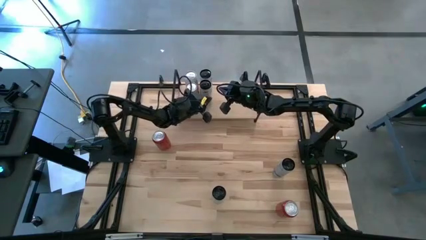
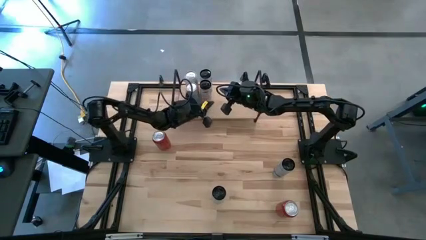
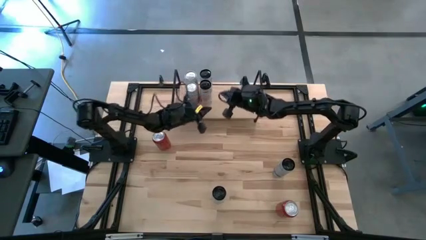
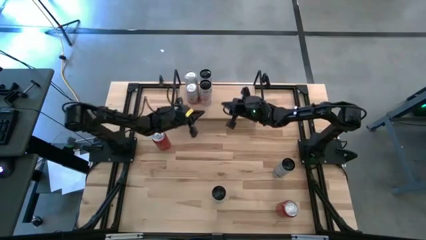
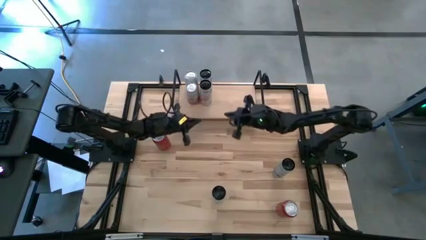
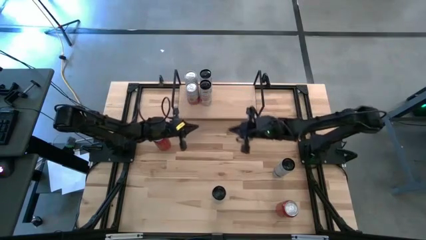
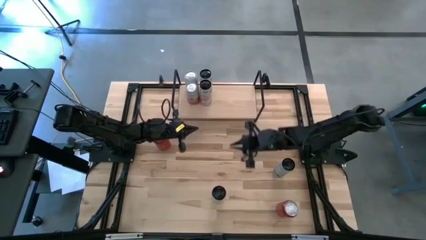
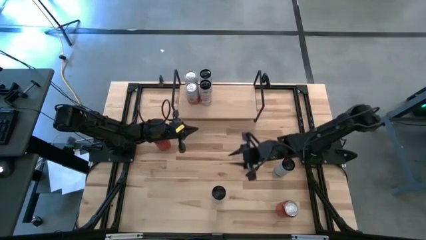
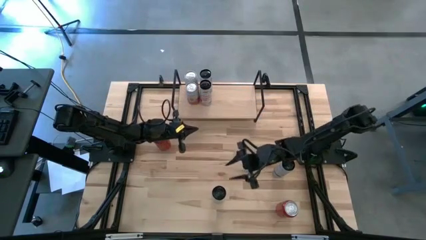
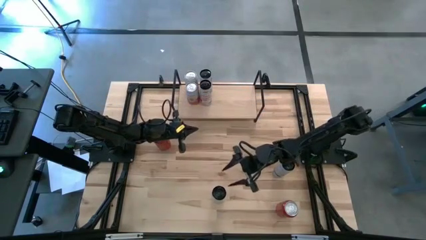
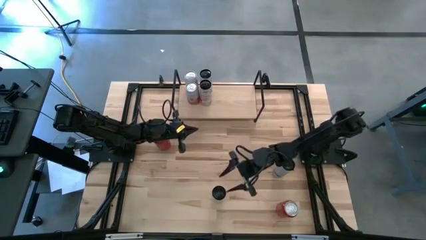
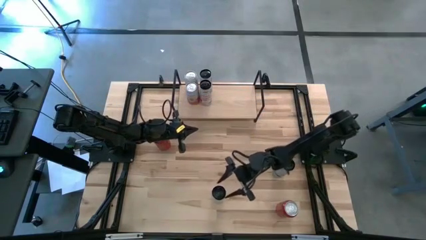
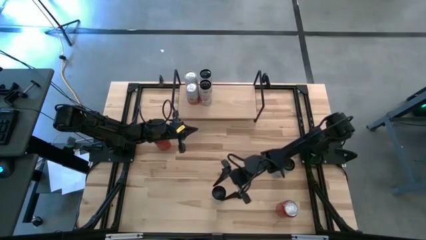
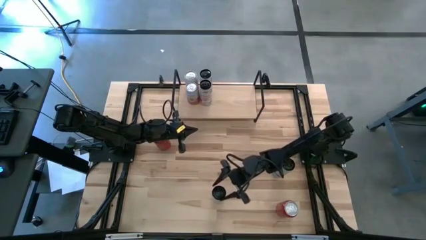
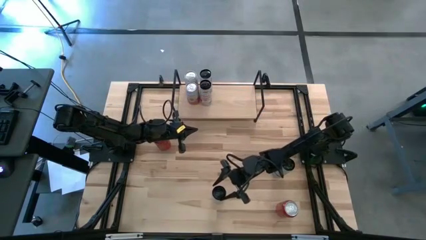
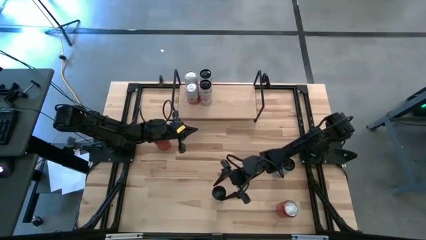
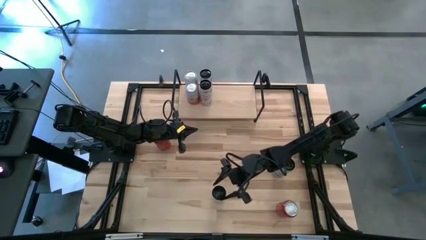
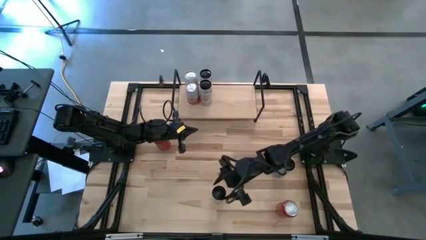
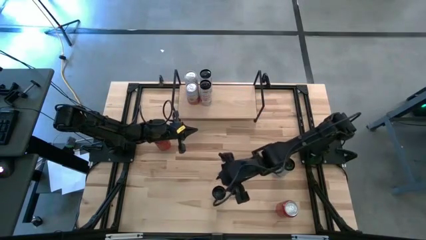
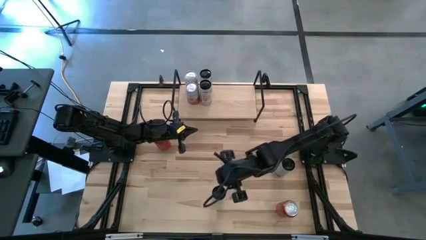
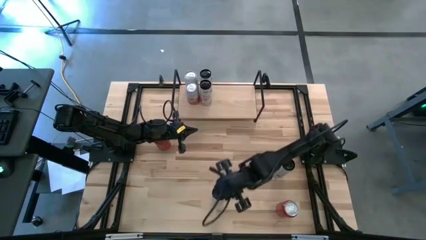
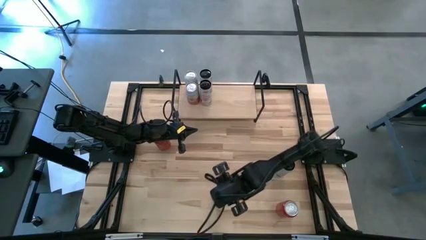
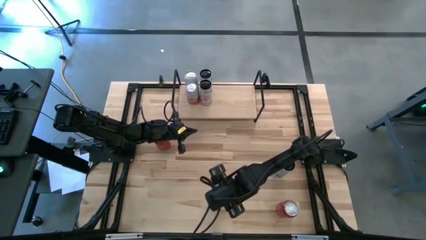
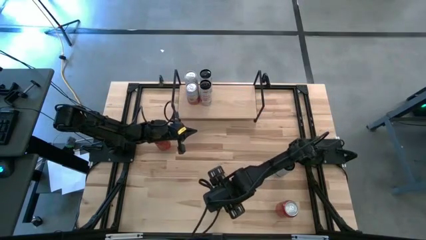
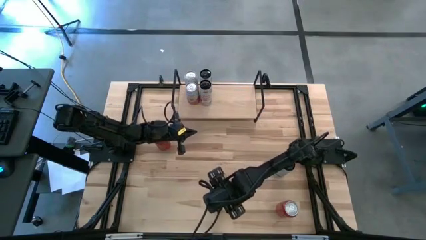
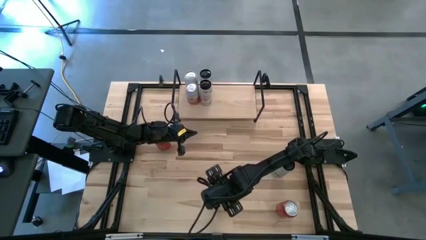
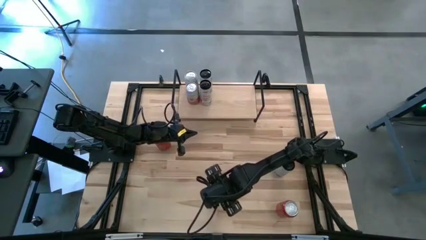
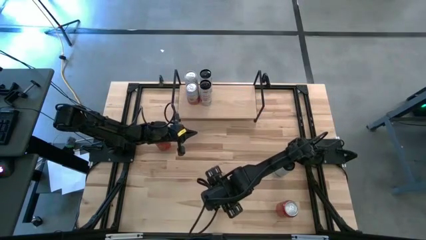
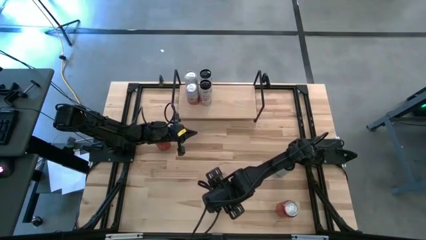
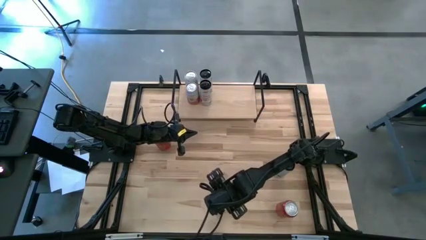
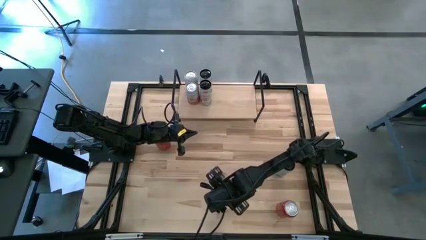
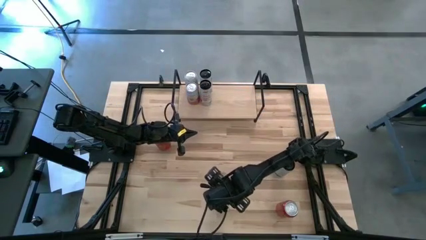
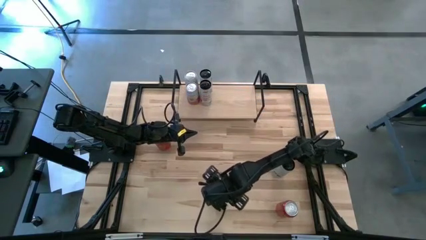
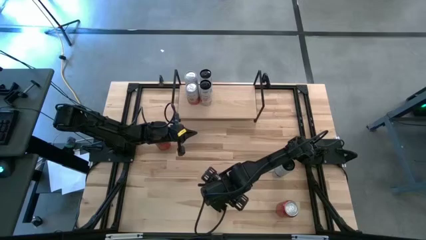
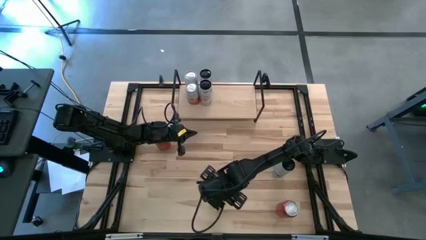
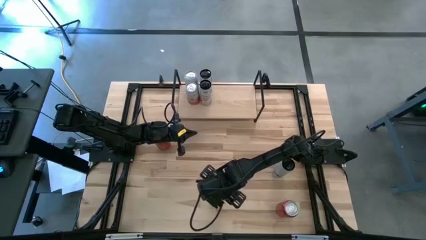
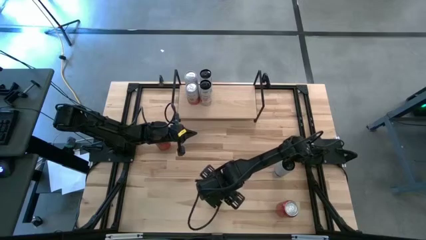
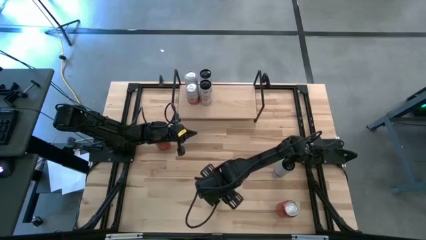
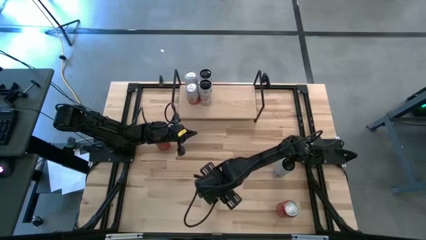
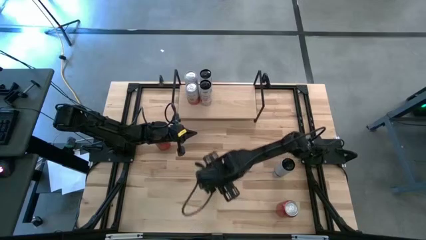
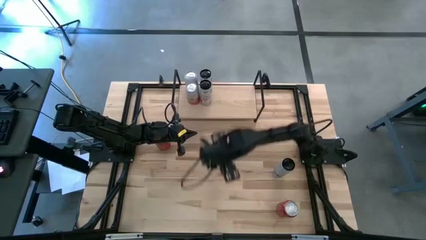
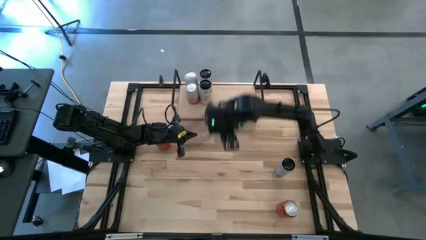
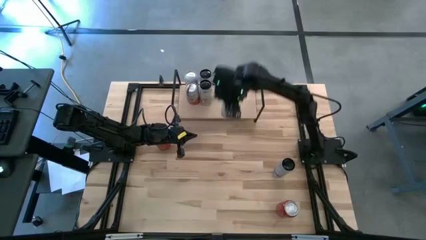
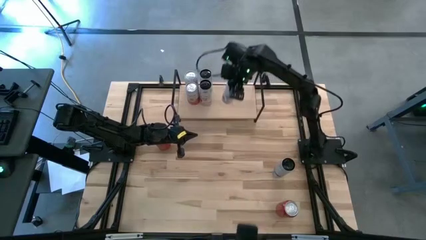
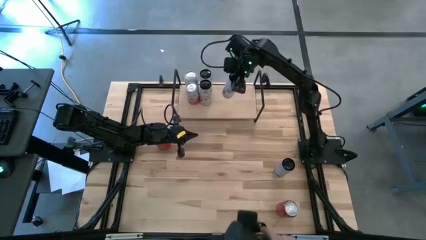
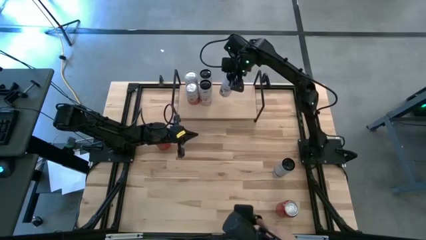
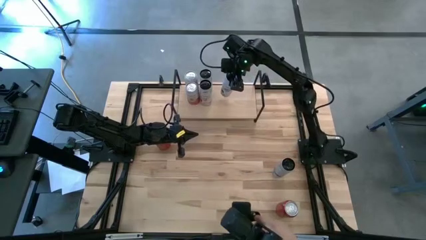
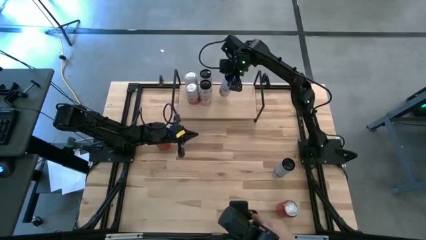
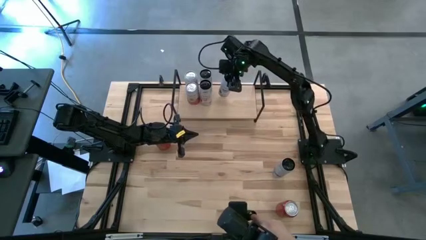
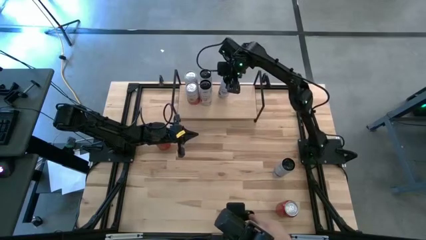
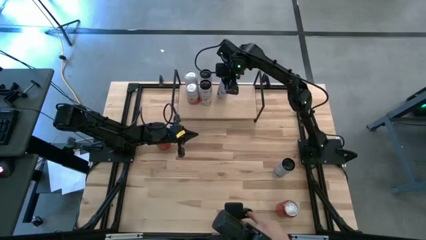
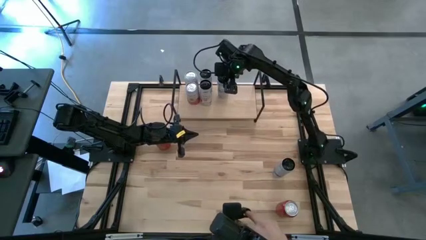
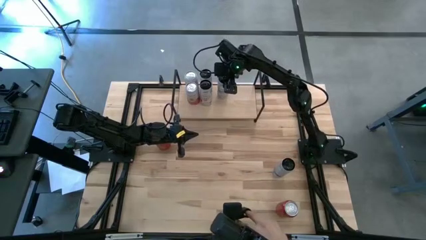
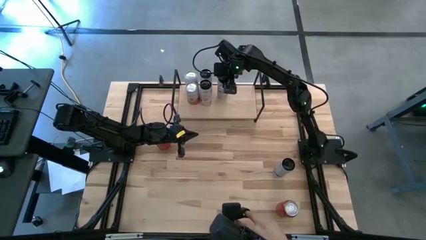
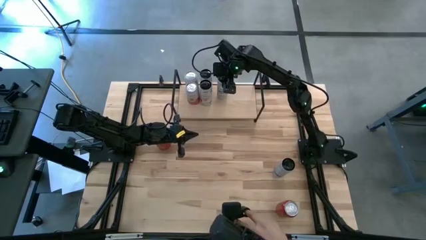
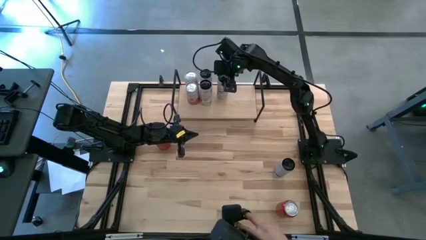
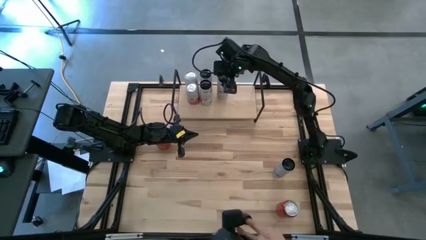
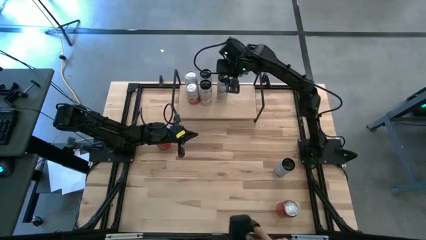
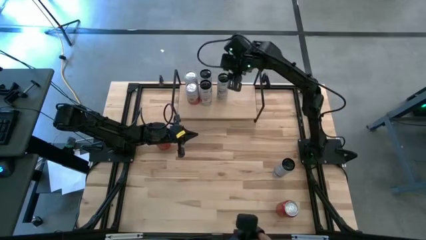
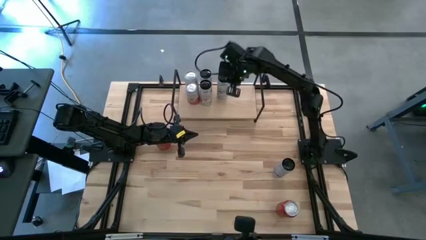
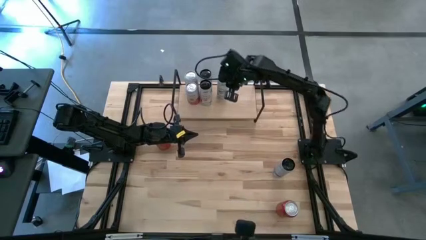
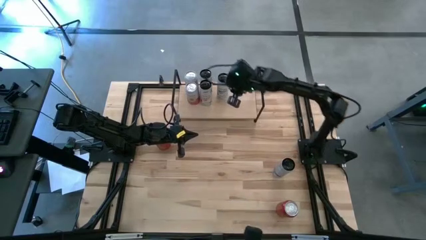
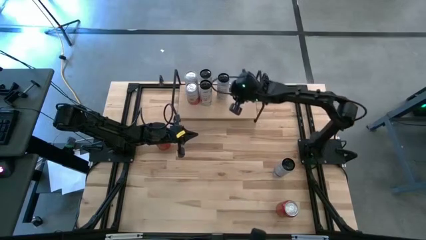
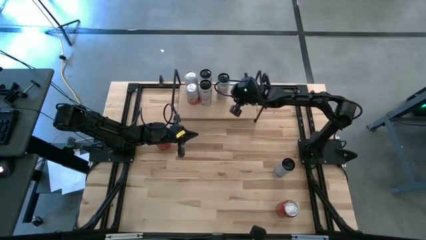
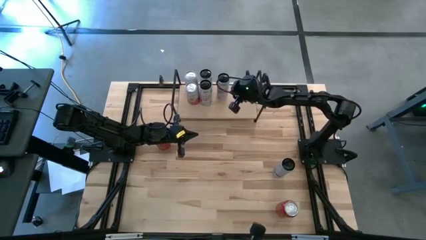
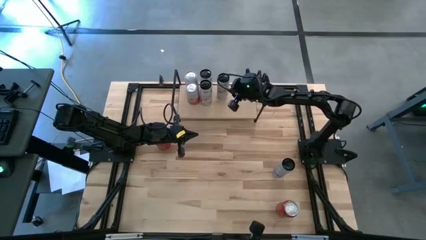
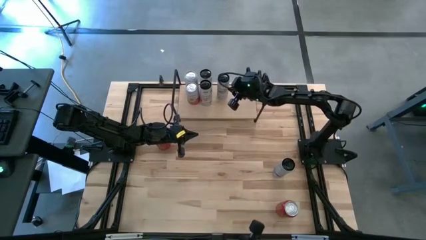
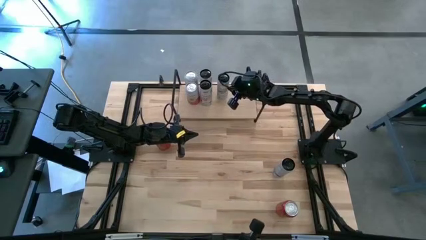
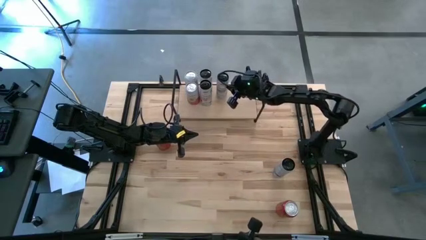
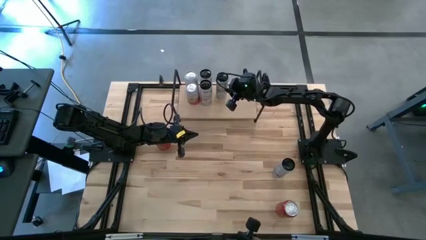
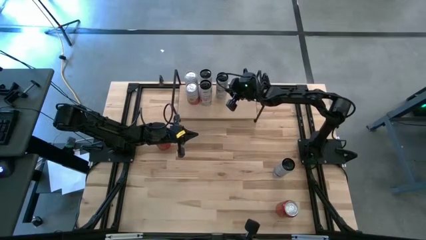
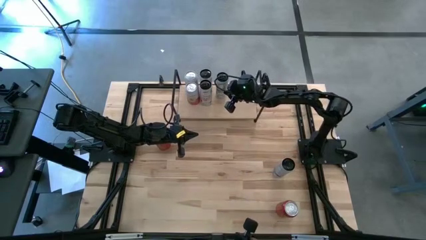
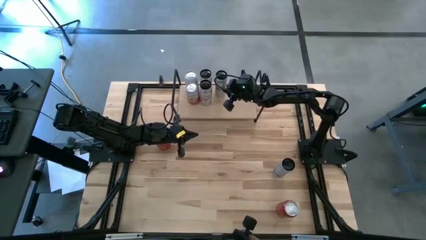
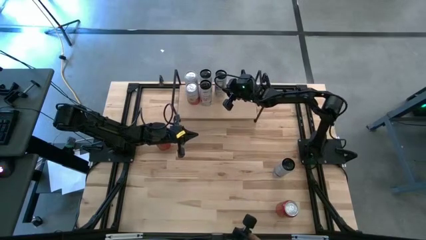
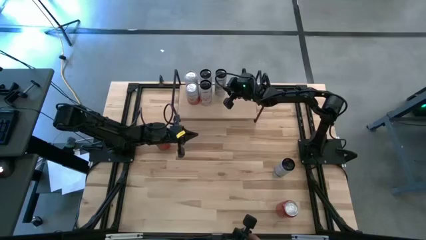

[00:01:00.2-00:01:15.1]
Task: Place canned beverage on shelf
Put the bottom white blue soda can on the shelf
